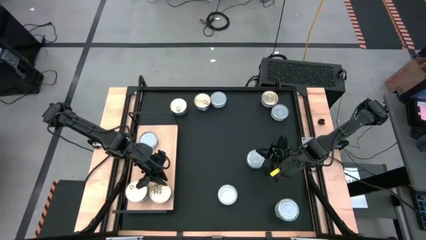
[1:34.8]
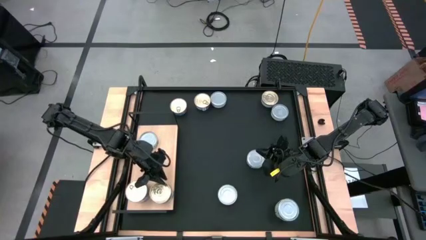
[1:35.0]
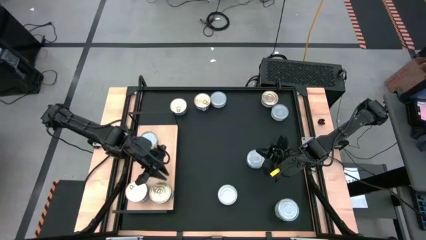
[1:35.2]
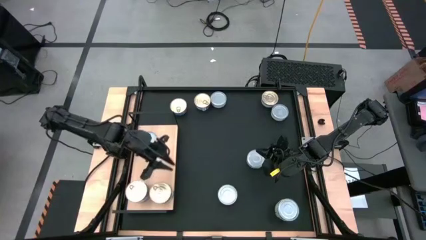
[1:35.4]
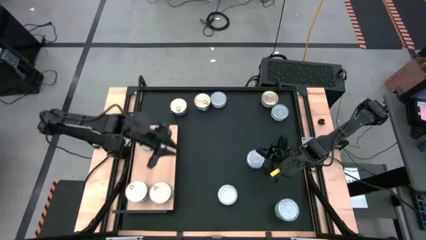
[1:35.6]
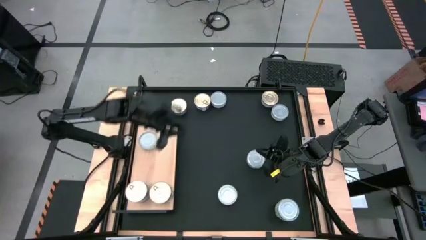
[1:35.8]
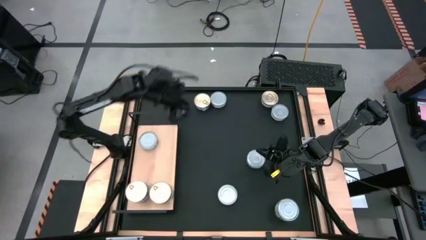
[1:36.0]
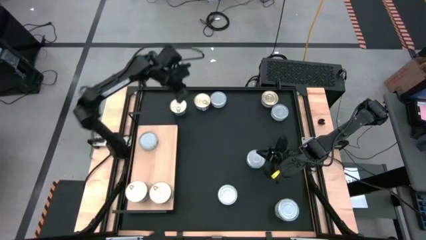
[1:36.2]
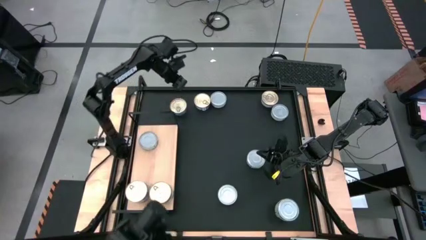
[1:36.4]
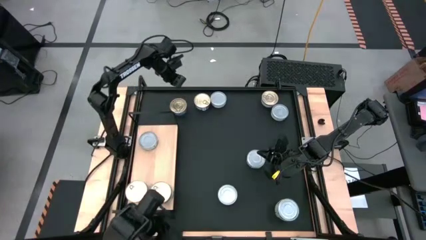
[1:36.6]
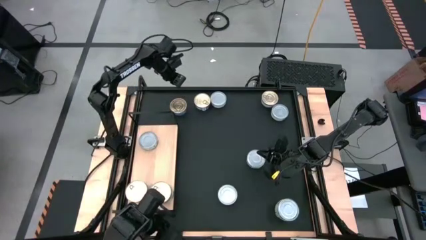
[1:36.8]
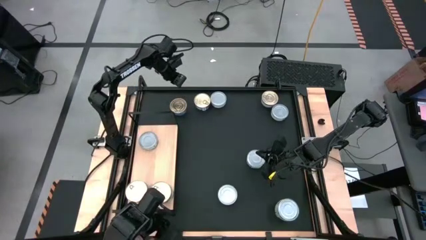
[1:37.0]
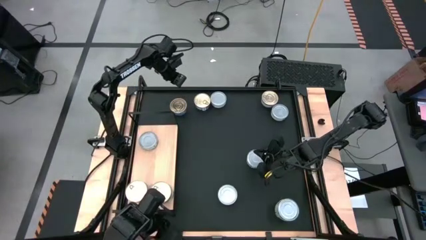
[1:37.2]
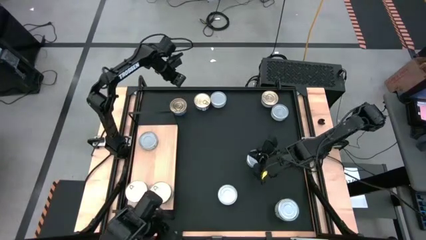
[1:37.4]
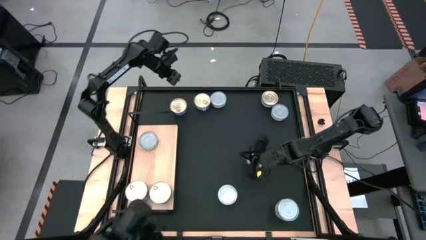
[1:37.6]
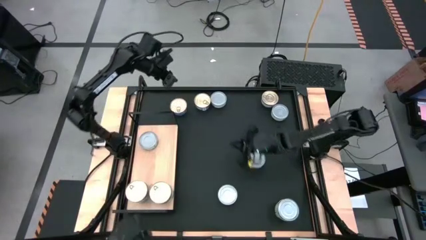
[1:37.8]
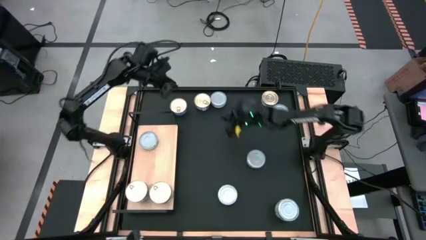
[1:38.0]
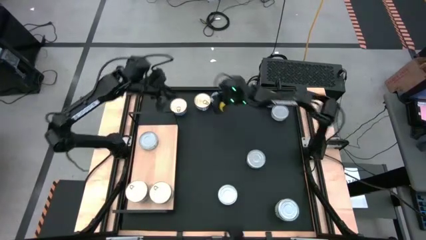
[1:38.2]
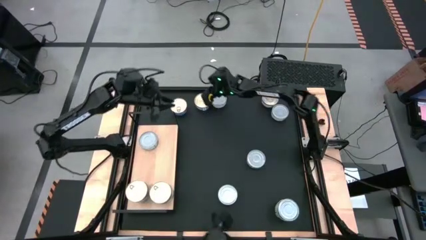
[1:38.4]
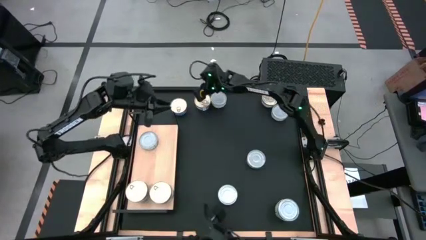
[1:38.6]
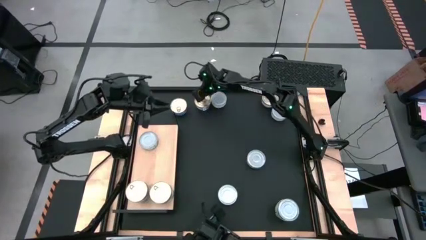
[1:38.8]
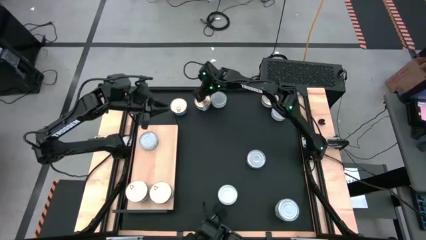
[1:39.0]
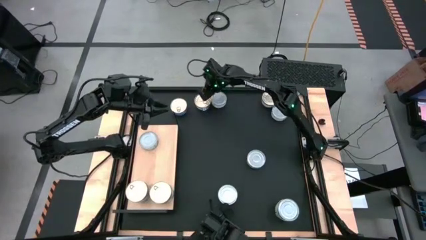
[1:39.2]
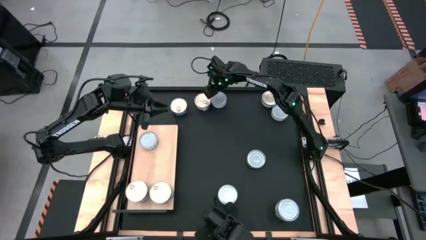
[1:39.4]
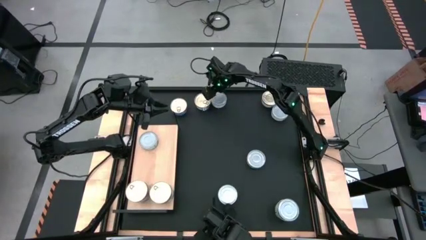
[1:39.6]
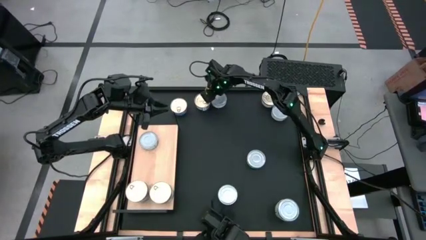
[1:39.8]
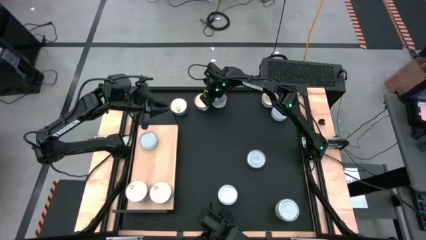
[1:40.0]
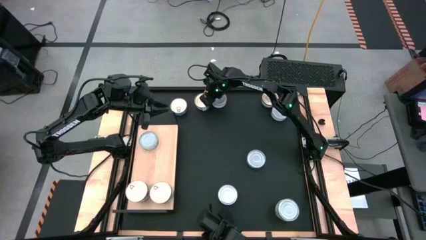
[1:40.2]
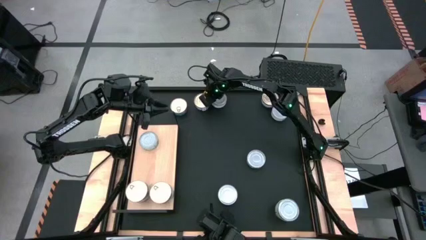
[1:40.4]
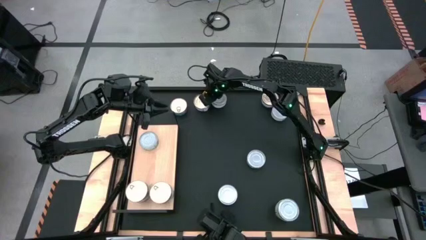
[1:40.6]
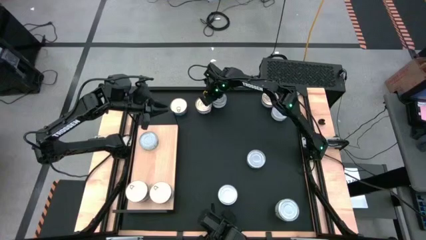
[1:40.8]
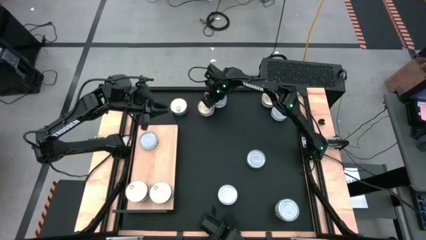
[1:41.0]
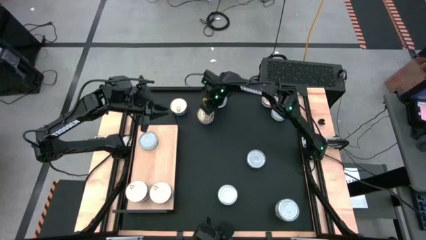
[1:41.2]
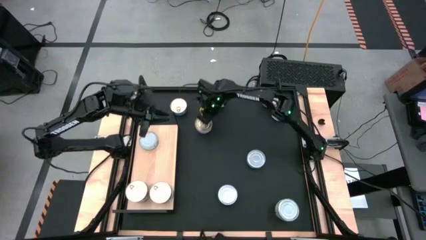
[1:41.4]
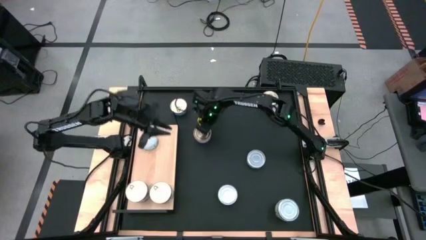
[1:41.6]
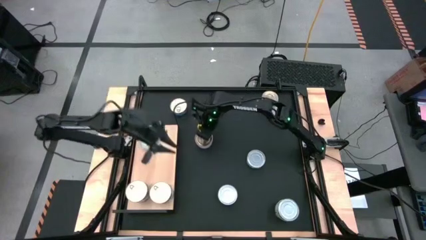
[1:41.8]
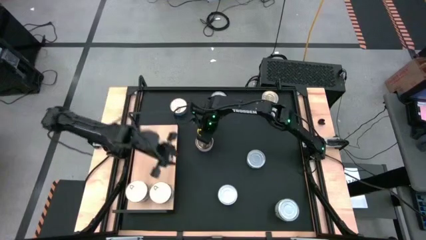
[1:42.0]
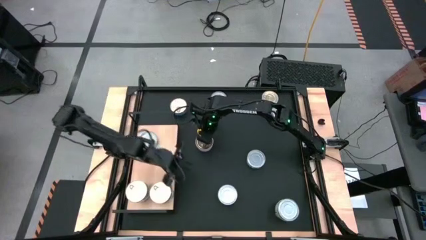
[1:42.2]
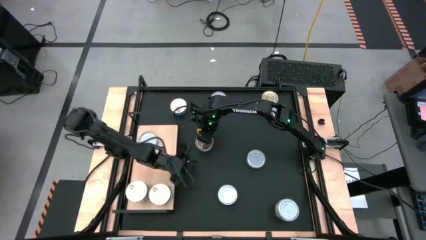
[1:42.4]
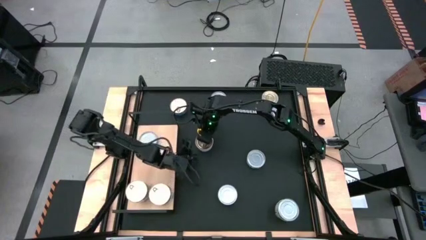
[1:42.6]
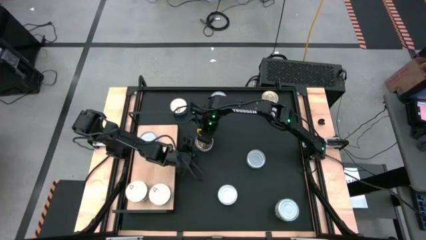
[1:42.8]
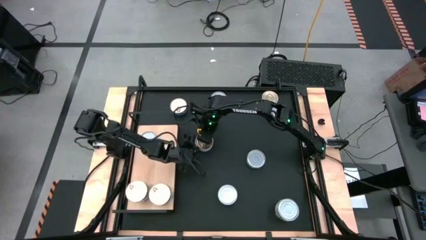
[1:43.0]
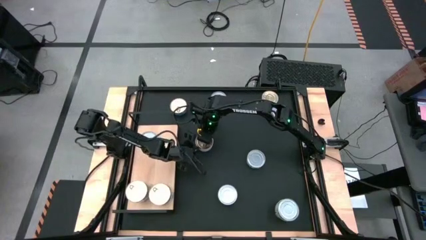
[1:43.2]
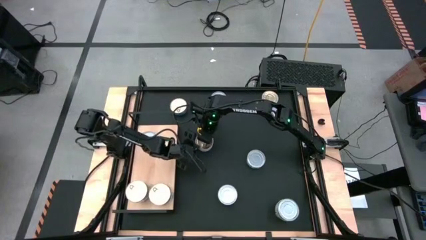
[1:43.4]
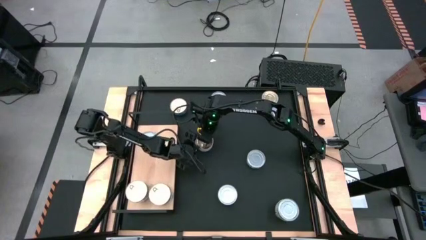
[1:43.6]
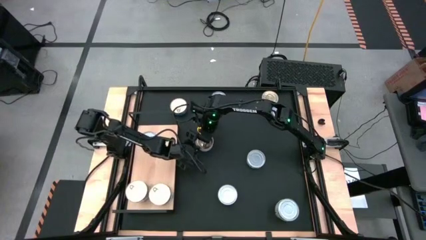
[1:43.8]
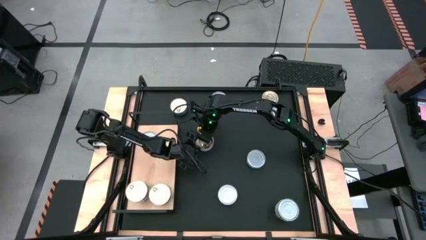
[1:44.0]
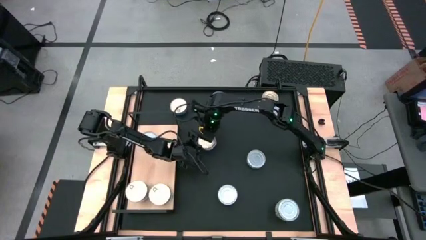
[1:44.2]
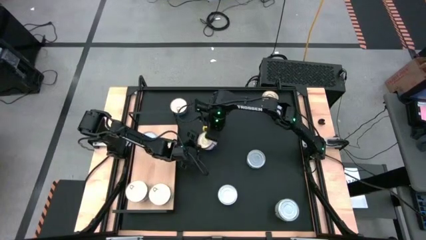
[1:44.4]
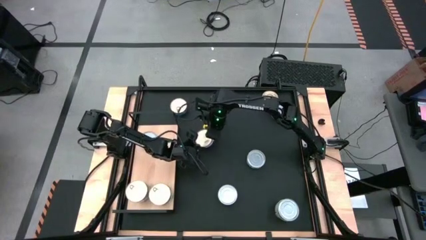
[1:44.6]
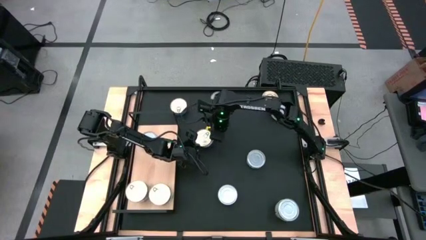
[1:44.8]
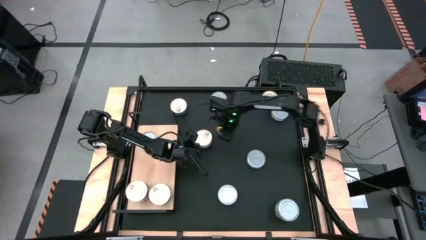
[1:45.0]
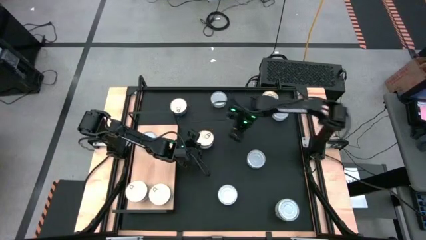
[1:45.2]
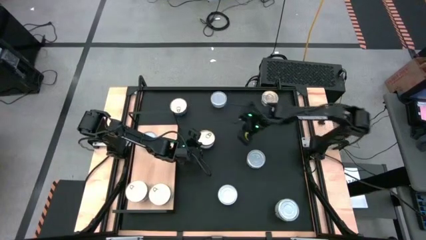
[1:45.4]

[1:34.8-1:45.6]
Task: Stack canned seafood by type on shelf
Put the blue tuna can aligned with the other blue tuna can on the shelf

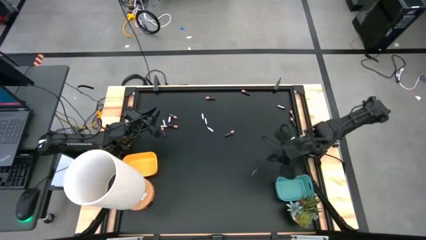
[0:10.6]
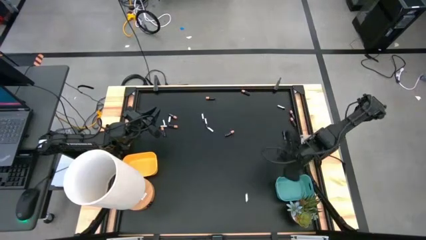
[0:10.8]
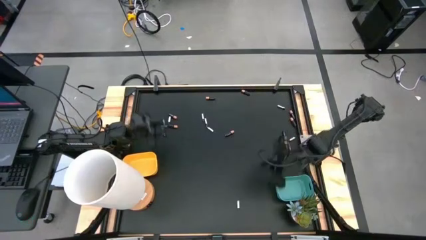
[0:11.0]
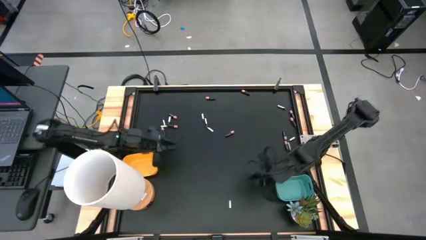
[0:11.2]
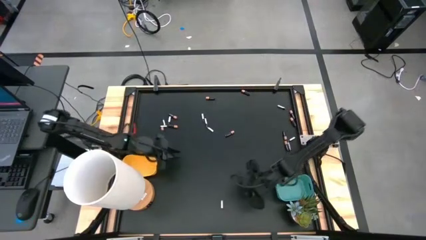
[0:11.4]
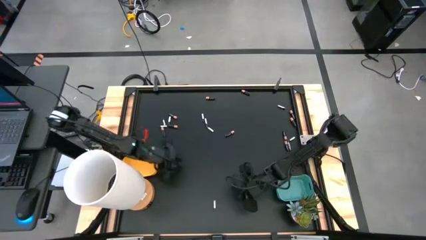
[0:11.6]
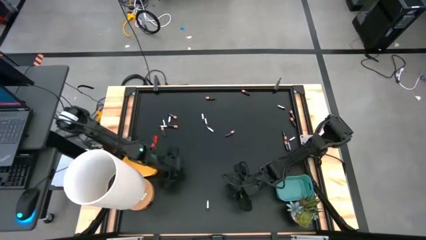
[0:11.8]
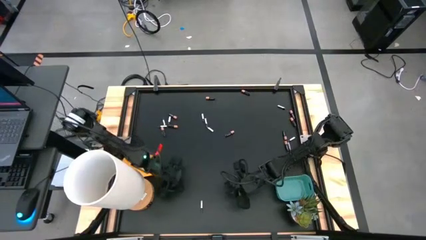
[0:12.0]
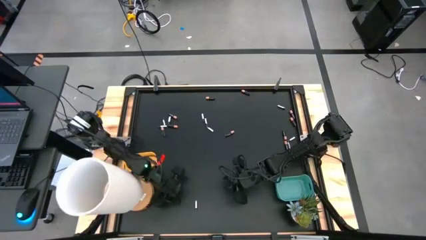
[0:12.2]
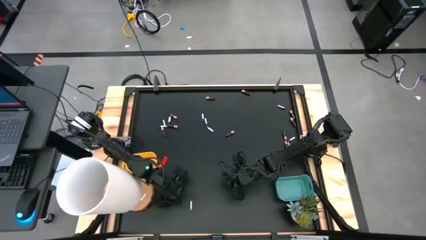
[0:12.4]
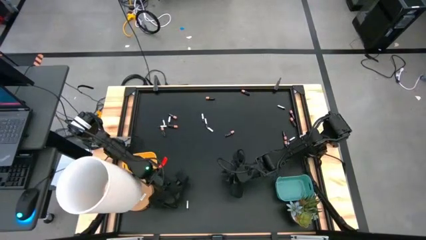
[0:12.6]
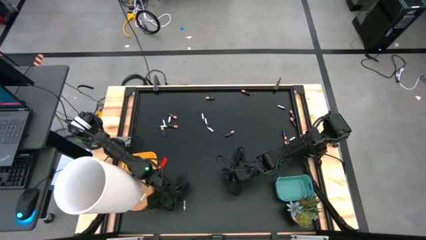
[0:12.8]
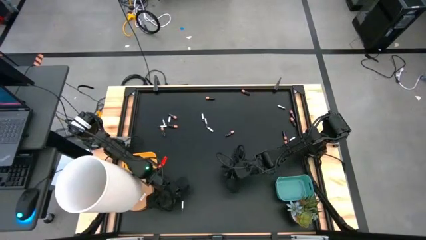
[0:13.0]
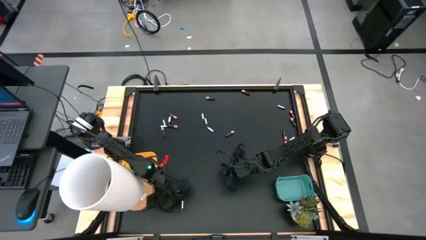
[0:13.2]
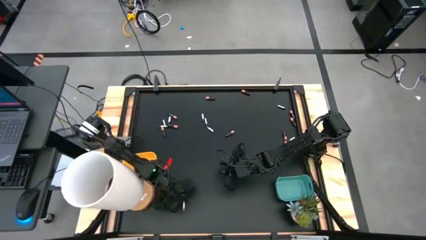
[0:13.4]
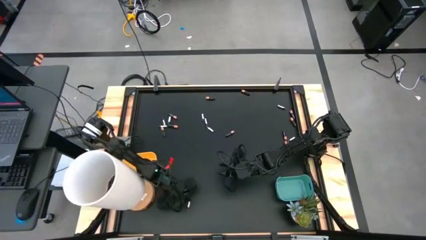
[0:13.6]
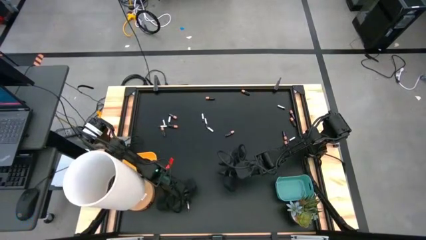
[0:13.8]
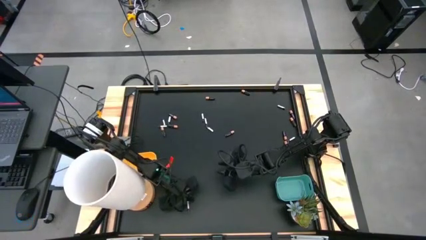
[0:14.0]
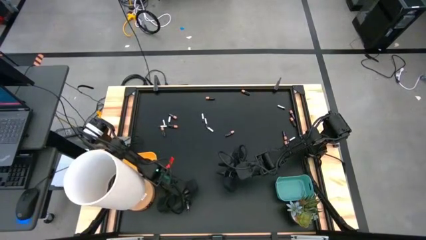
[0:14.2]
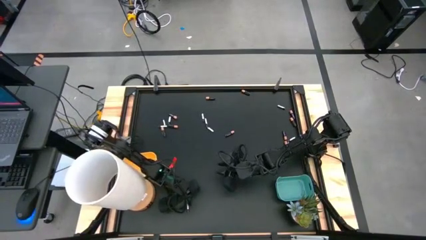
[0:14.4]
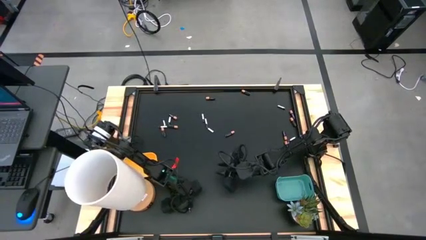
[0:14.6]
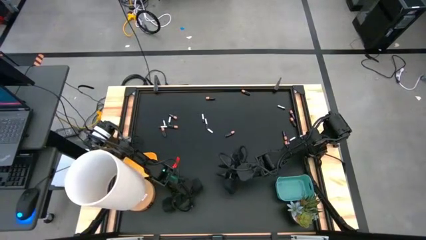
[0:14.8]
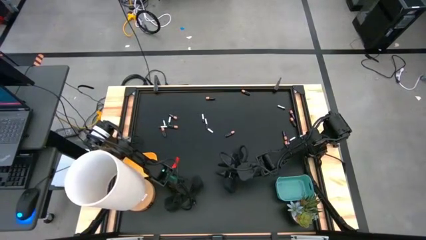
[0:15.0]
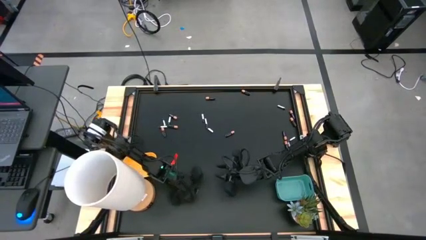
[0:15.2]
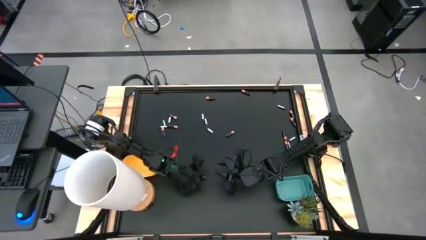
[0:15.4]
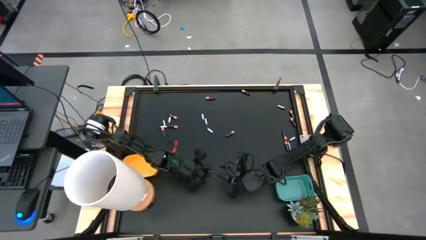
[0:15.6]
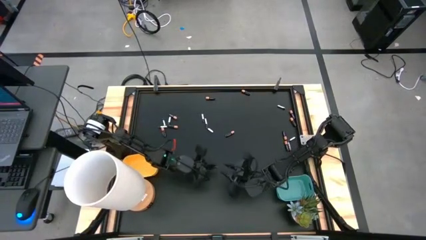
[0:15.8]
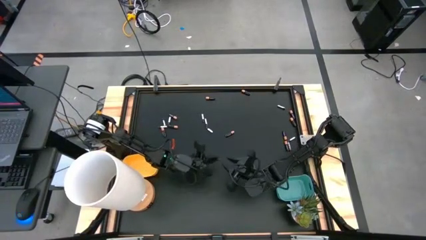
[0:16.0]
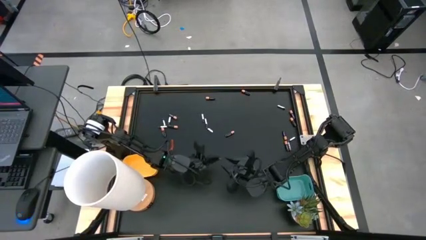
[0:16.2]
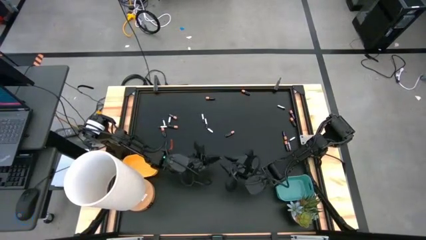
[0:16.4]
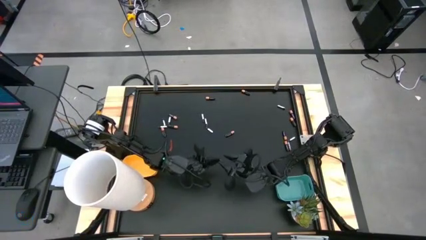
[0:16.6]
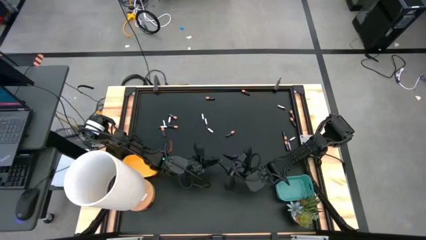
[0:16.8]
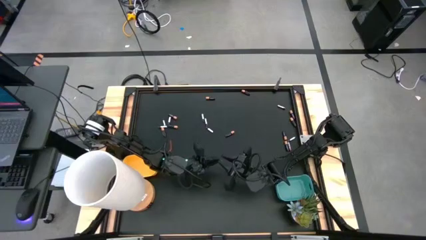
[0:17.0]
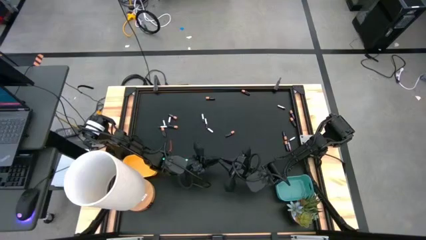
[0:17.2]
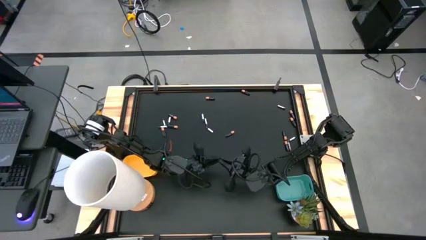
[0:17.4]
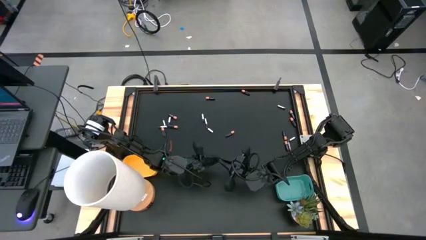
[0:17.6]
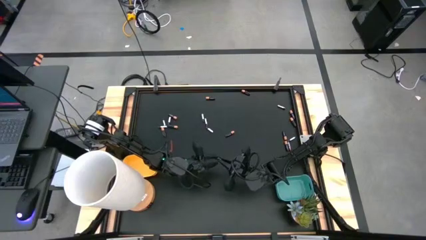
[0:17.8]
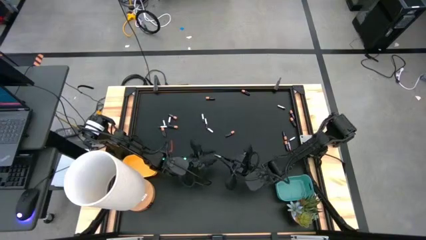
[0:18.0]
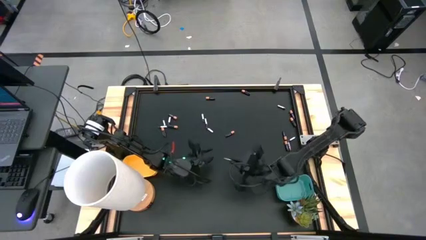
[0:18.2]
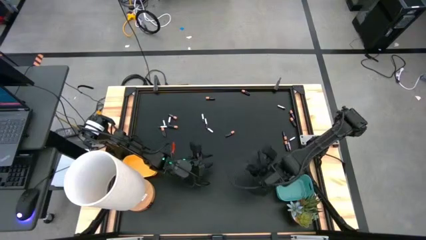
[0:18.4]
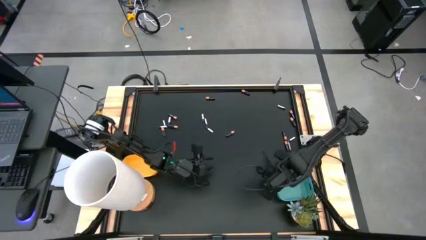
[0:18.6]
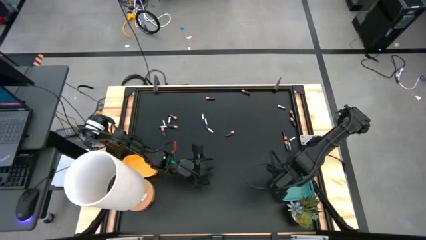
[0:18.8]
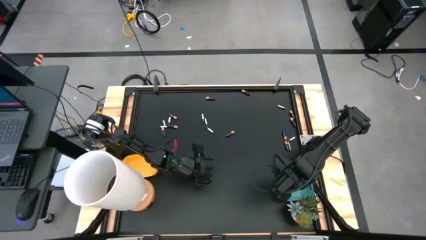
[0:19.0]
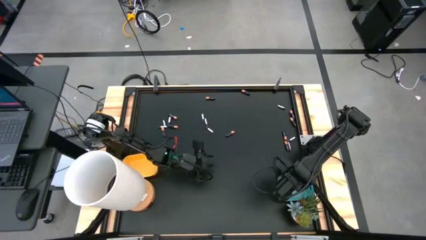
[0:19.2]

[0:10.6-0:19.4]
Task: Sort batteries
Put the silver battery into the green bin
